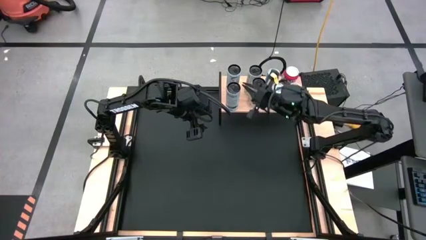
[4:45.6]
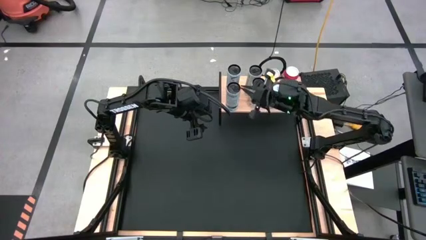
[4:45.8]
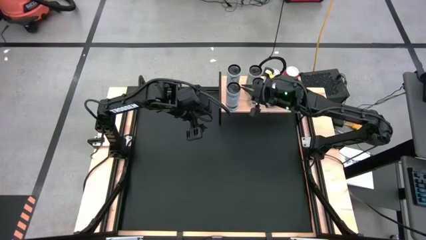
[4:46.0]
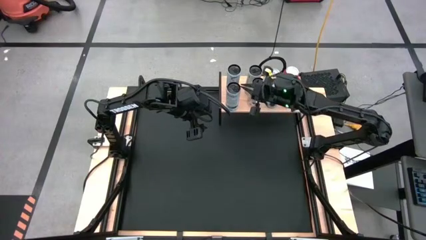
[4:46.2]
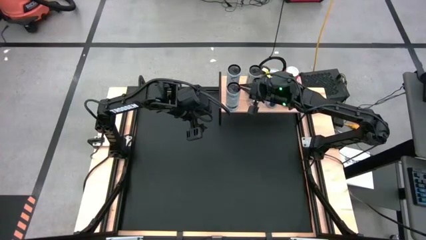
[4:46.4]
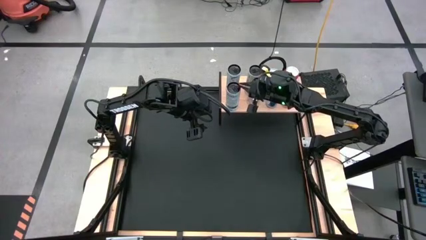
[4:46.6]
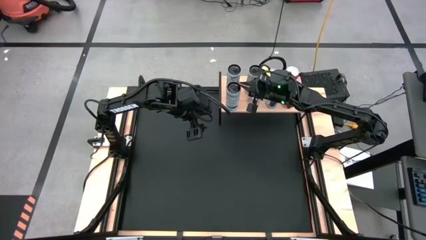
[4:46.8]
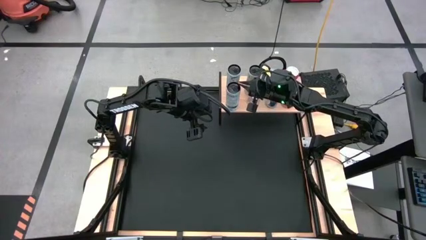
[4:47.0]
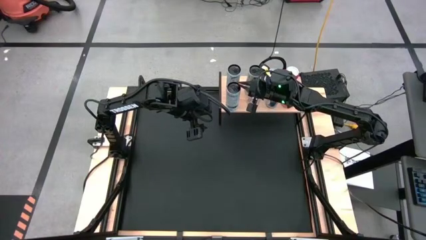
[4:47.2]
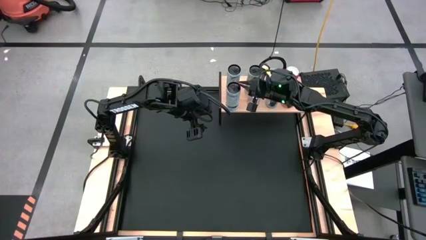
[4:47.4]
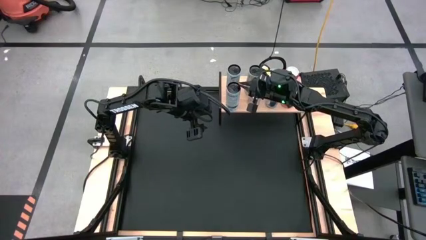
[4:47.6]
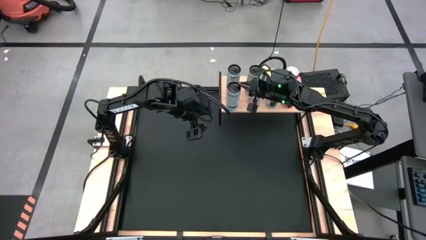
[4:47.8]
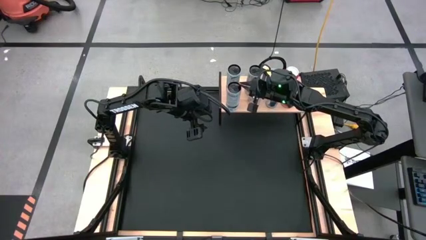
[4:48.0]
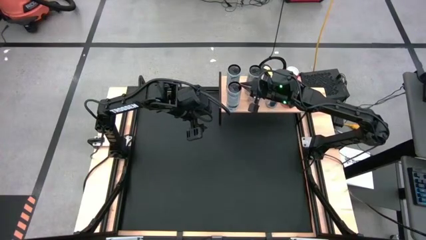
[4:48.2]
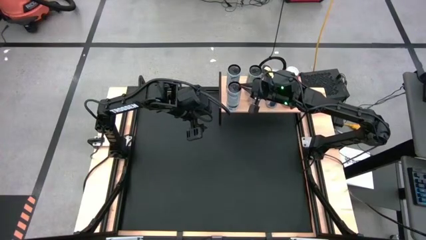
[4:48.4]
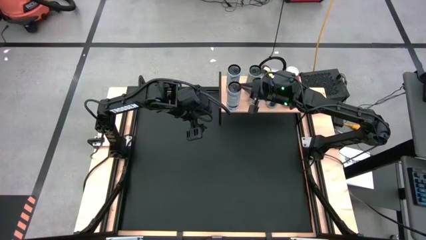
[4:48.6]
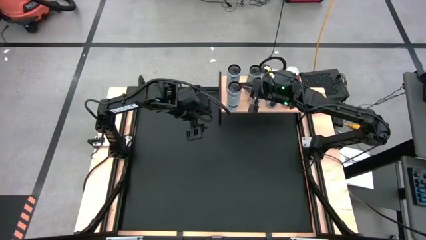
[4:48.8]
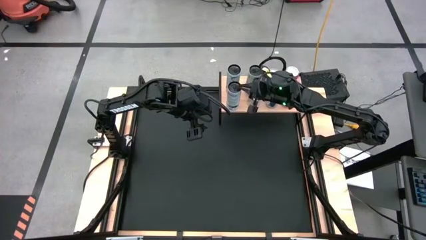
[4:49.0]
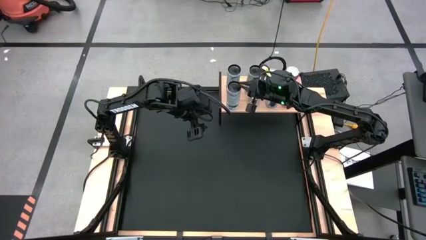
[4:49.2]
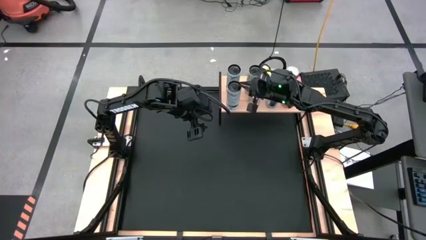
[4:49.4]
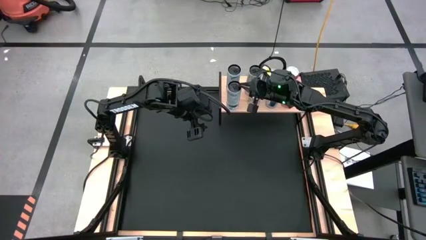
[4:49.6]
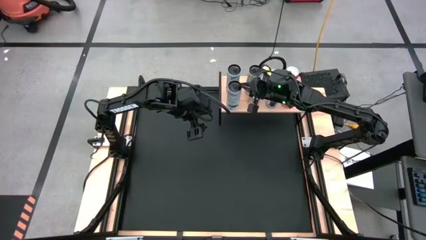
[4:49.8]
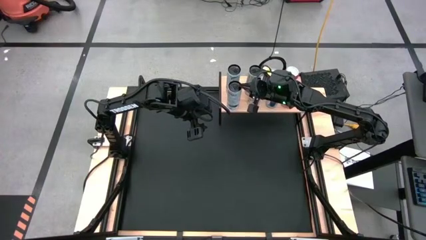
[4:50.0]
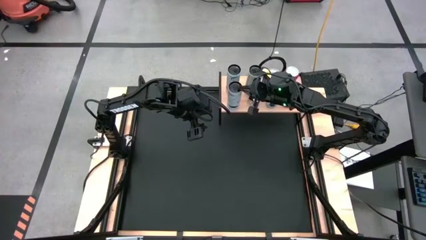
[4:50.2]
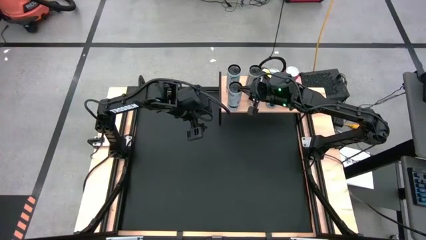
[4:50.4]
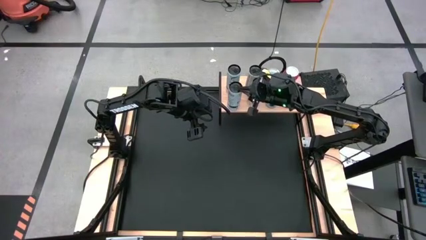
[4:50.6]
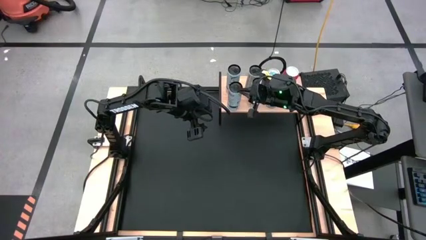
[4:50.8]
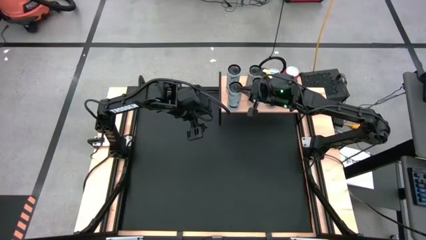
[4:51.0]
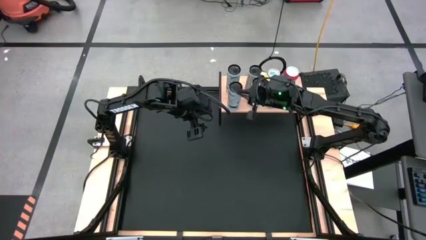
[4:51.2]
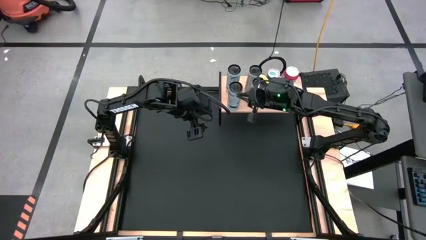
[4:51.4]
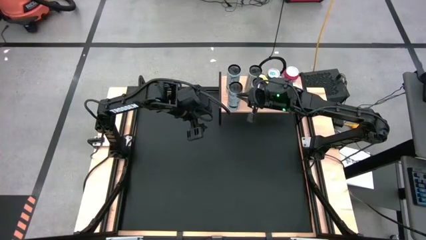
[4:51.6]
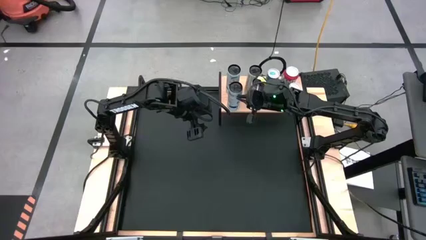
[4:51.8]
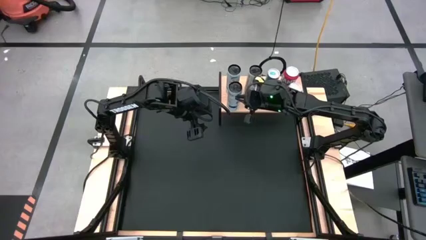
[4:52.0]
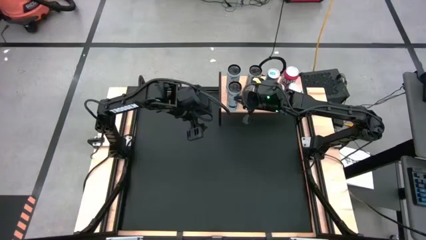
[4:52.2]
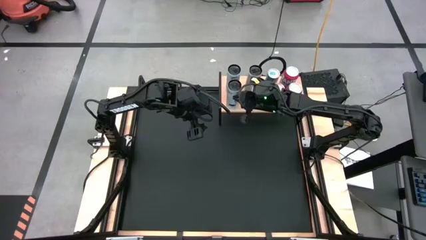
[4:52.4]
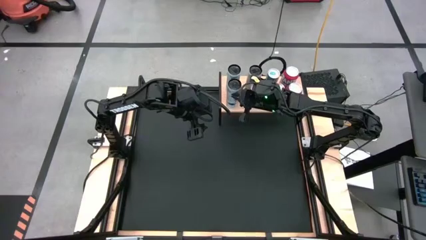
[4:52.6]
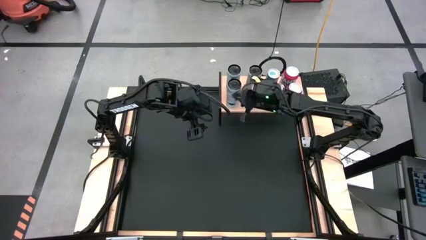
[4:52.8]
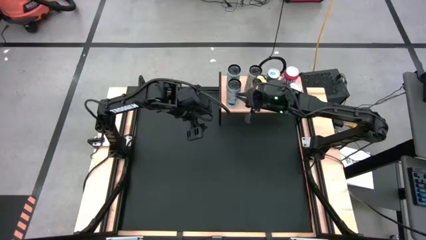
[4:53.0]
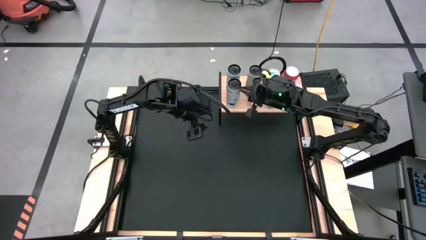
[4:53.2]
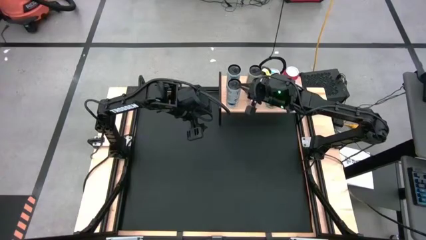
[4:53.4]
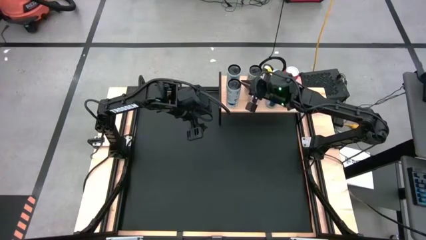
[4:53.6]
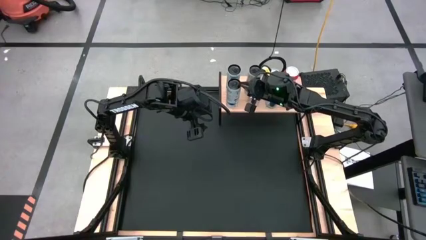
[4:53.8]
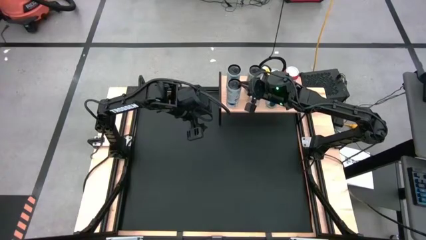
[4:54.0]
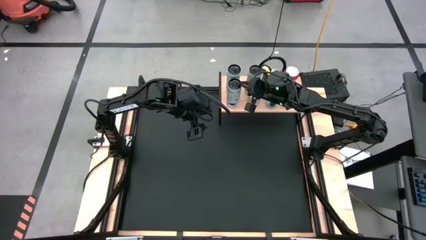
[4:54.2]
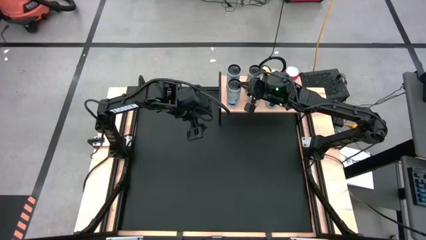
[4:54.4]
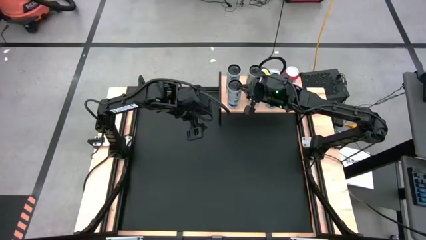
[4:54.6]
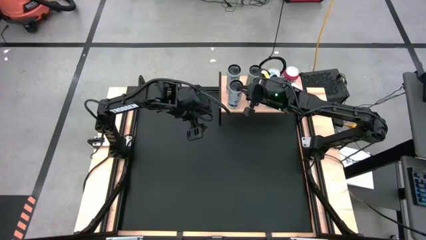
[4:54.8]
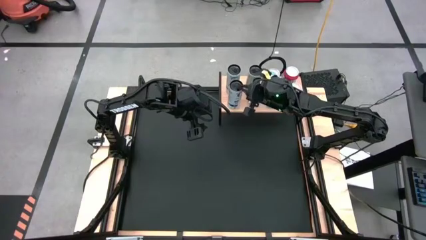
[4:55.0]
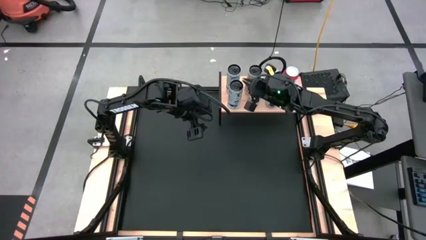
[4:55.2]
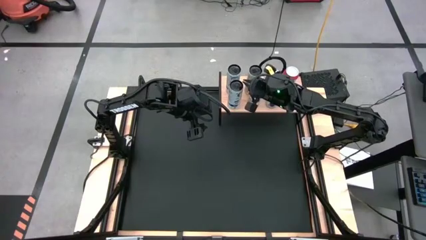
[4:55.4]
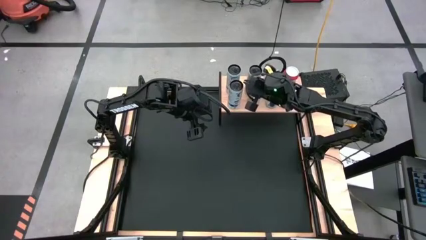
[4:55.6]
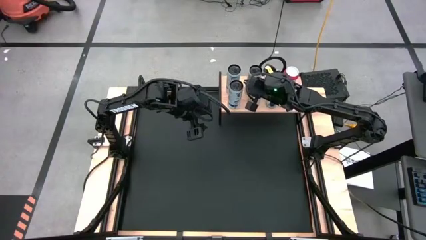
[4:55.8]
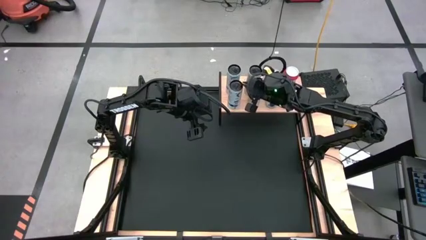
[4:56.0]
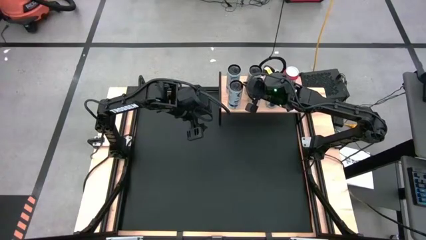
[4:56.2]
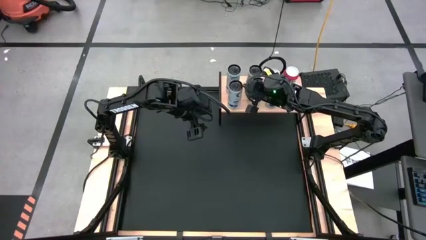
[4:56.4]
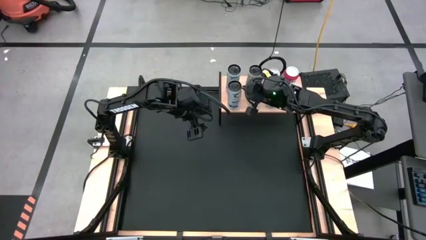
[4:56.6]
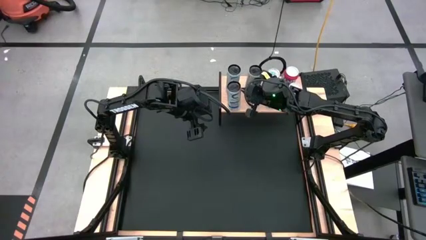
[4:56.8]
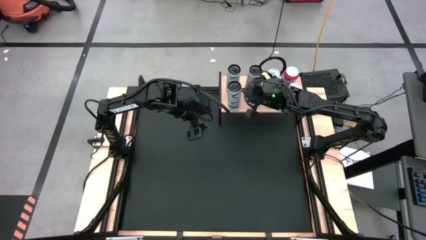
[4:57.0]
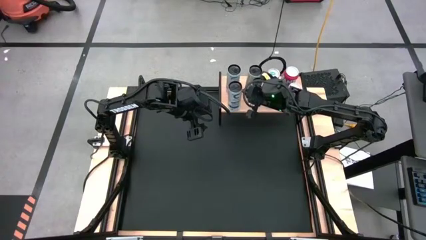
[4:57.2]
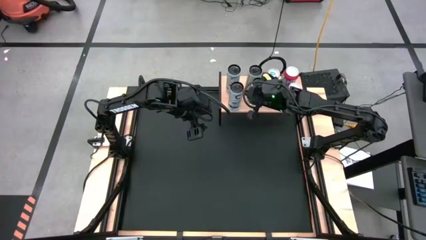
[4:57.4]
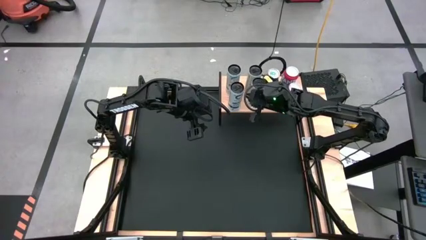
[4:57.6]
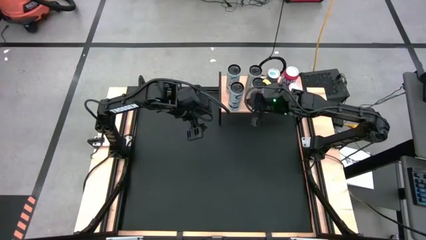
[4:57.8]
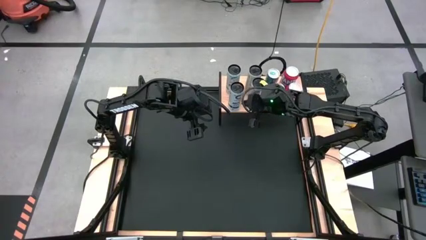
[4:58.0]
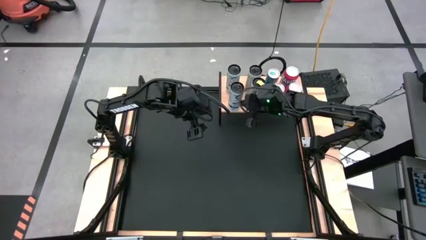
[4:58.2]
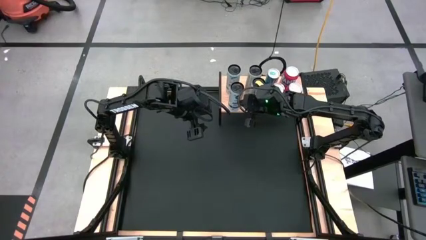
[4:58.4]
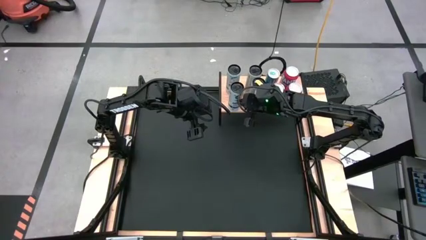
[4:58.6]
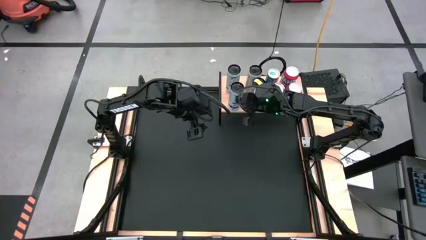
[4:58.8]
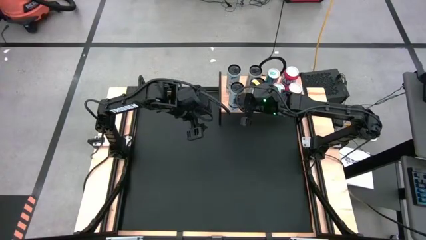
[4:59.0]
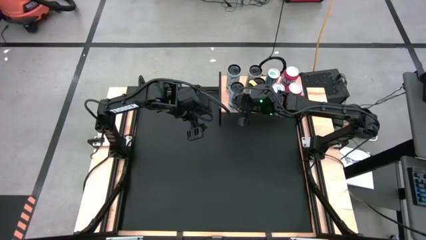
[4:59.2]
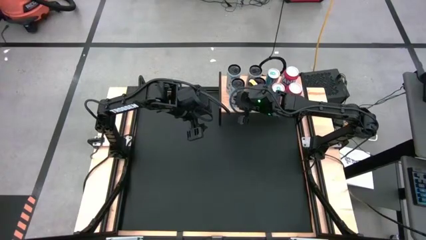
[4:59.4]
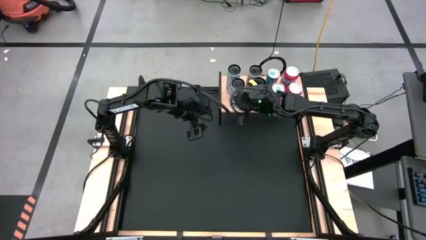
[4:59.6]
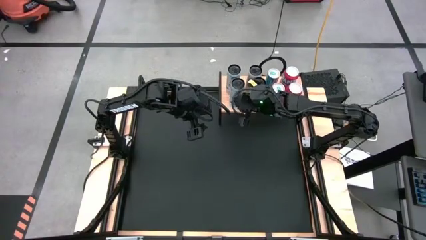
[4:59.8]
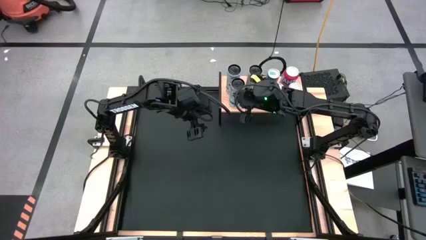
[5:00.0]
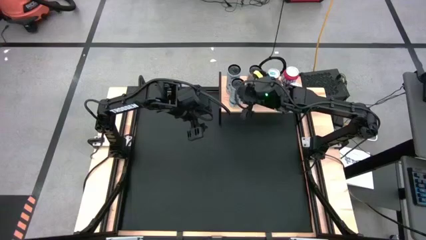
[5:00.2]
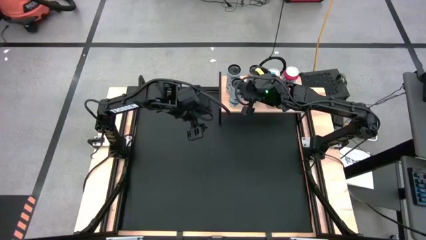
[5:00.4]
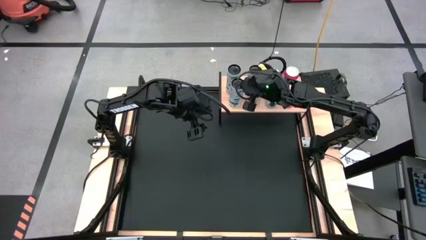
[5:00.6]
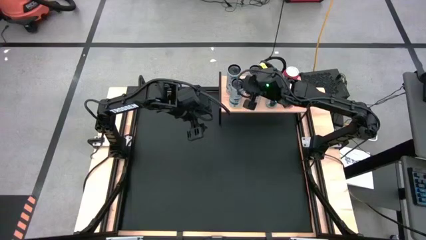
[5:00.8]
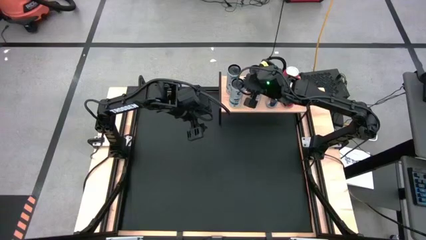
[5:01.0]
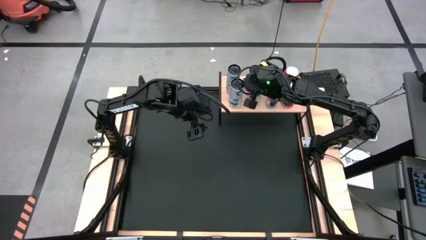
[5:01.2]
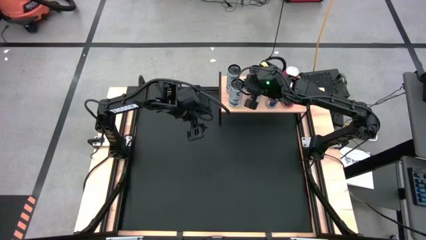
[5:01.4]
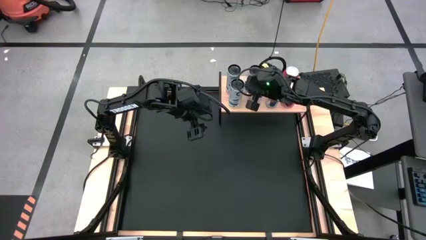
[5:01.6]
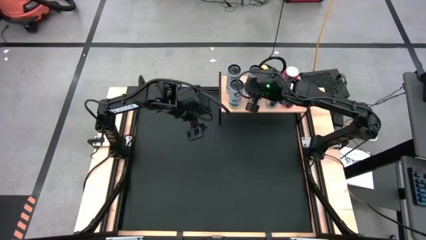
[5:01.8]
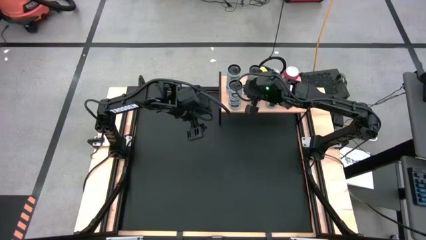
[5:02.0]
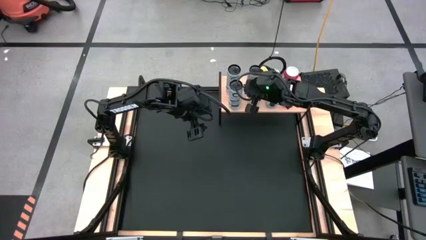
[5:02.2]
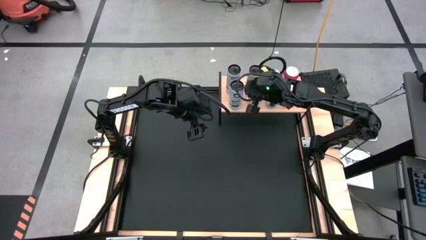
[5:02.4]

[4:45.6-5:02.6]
Task: Place canned beverage on shelf
Put the white blue soda can on the shelf aligned with the white blue soda can
